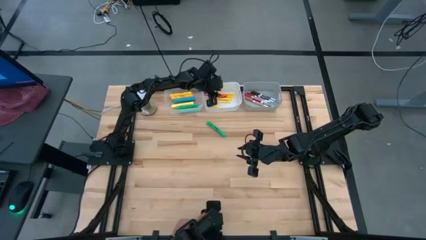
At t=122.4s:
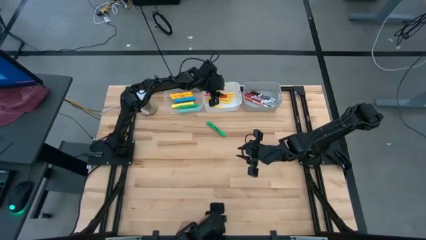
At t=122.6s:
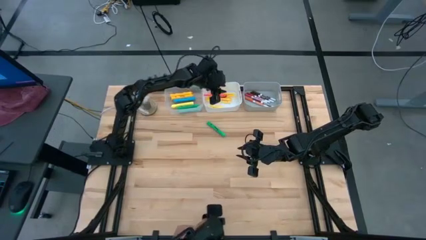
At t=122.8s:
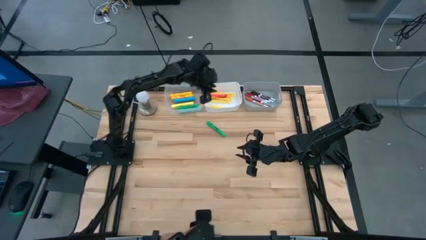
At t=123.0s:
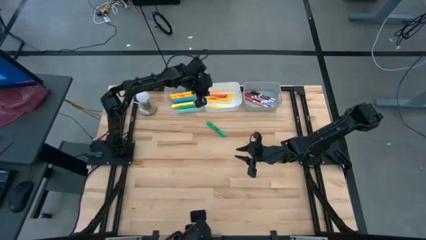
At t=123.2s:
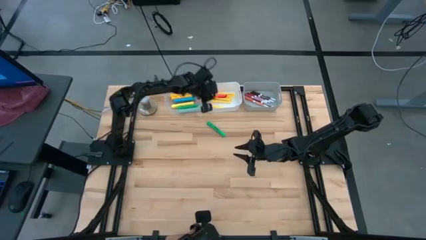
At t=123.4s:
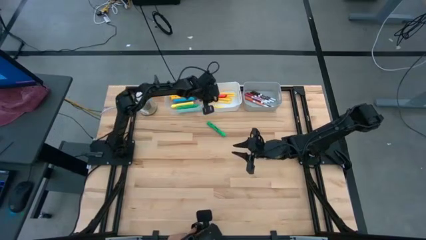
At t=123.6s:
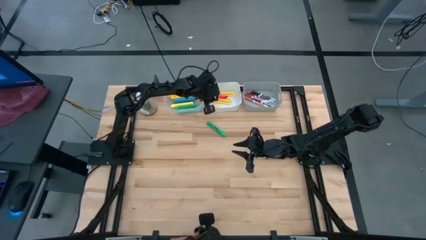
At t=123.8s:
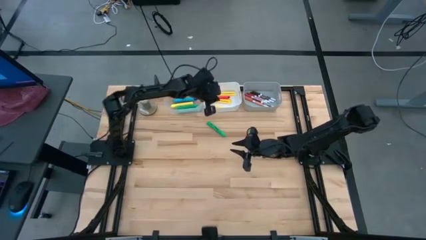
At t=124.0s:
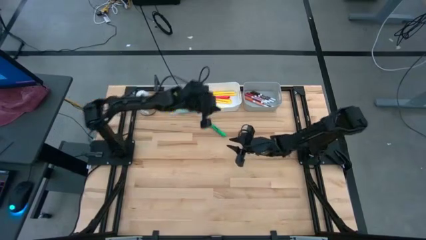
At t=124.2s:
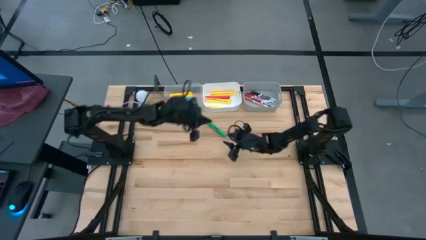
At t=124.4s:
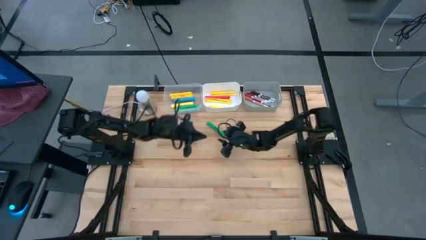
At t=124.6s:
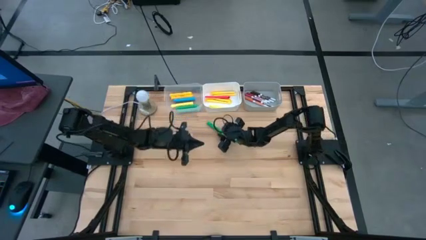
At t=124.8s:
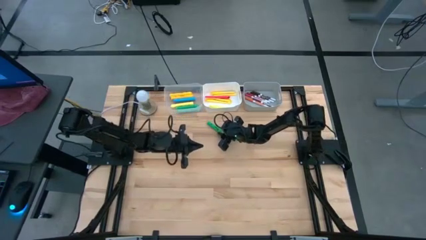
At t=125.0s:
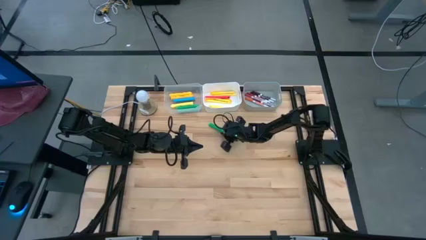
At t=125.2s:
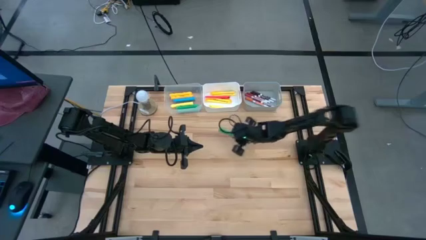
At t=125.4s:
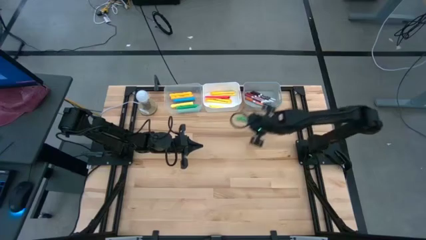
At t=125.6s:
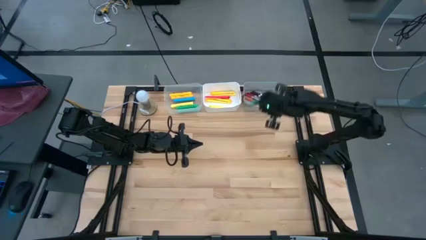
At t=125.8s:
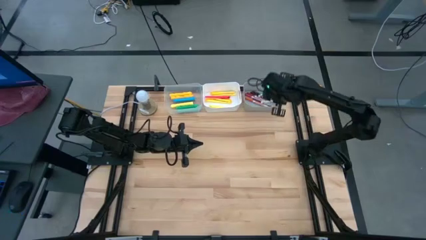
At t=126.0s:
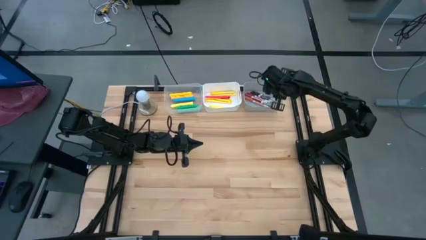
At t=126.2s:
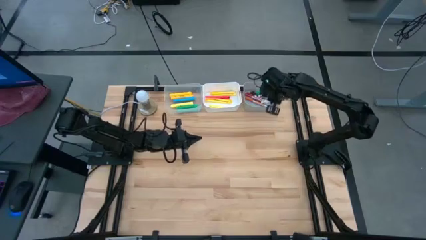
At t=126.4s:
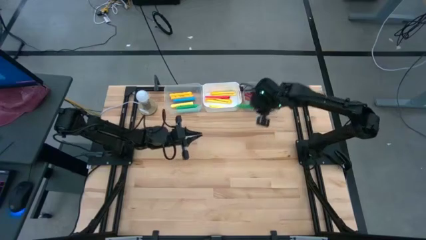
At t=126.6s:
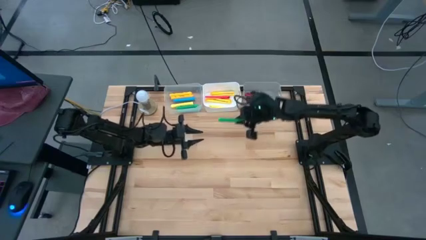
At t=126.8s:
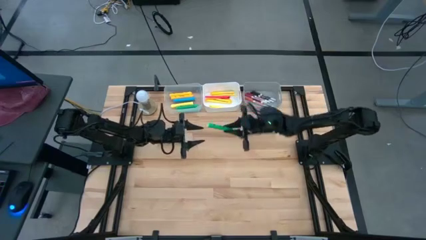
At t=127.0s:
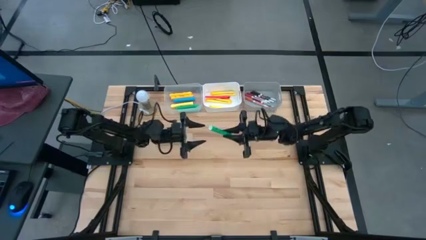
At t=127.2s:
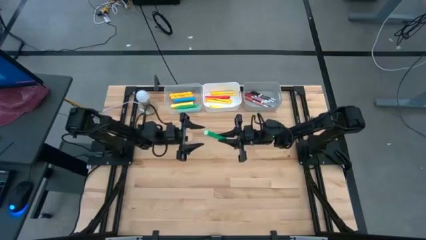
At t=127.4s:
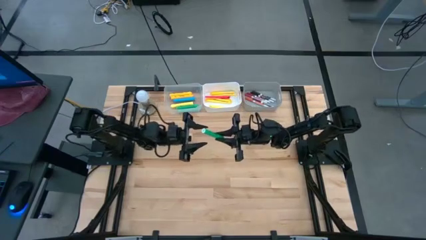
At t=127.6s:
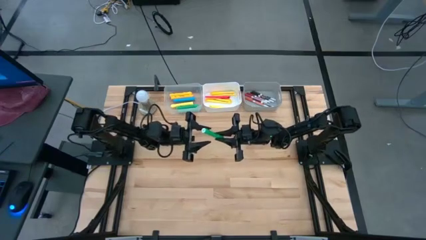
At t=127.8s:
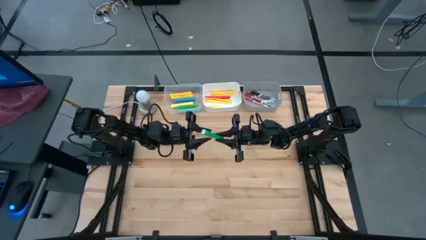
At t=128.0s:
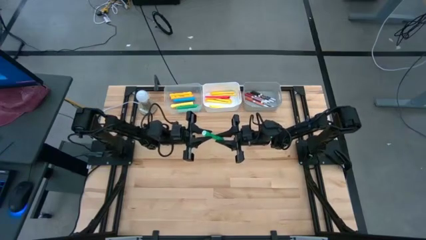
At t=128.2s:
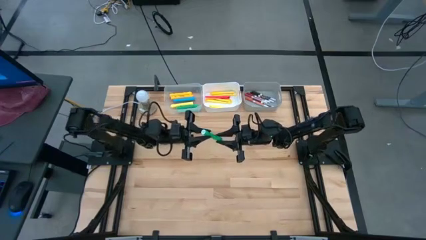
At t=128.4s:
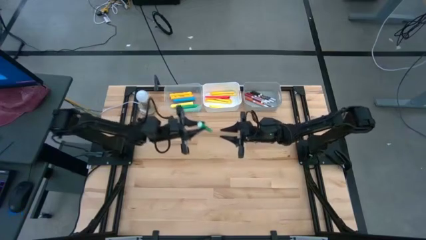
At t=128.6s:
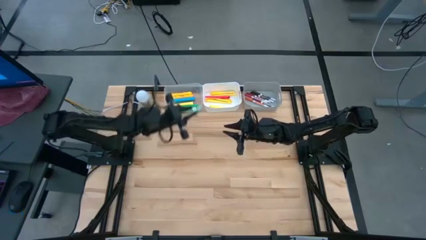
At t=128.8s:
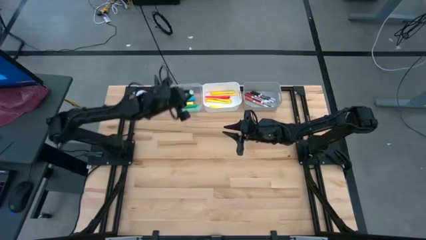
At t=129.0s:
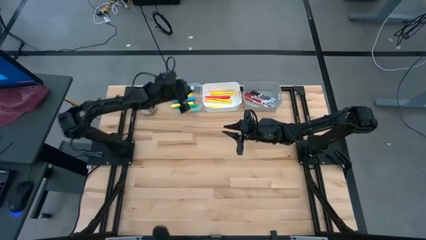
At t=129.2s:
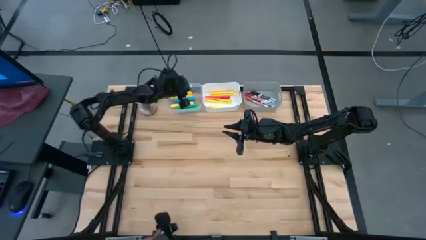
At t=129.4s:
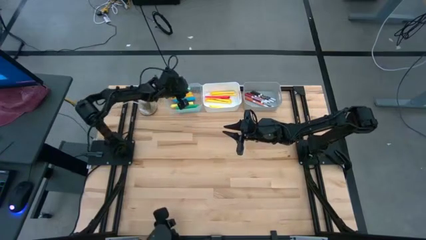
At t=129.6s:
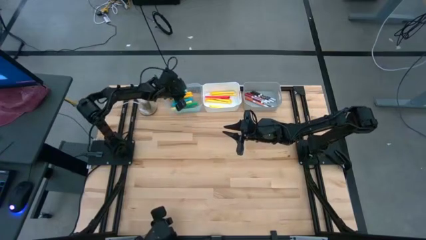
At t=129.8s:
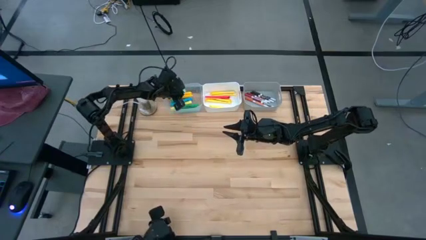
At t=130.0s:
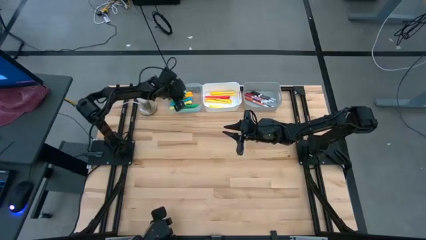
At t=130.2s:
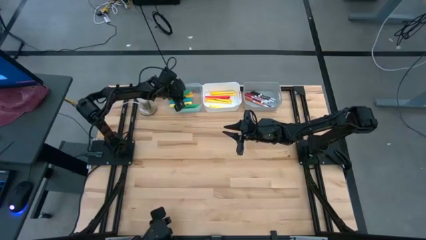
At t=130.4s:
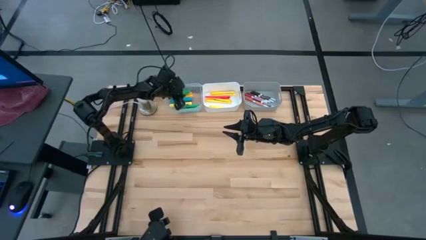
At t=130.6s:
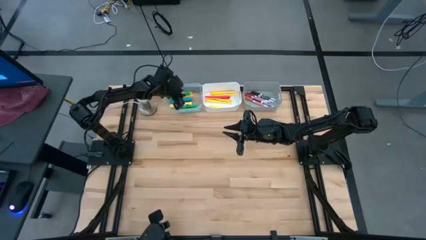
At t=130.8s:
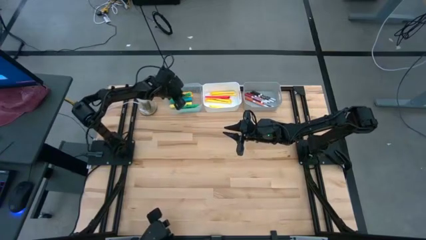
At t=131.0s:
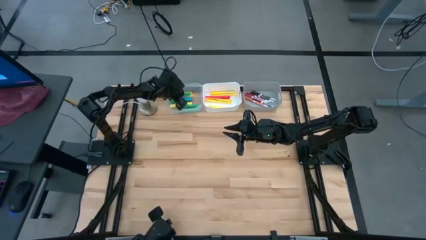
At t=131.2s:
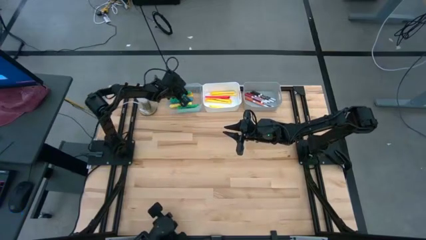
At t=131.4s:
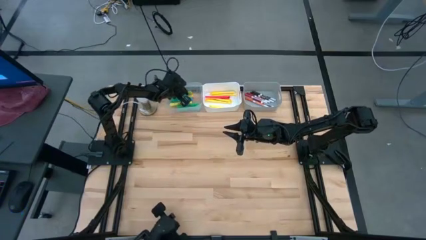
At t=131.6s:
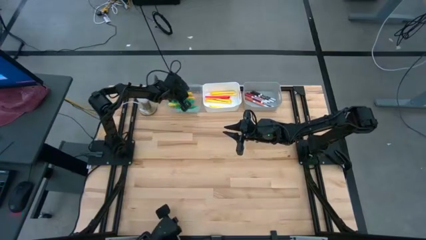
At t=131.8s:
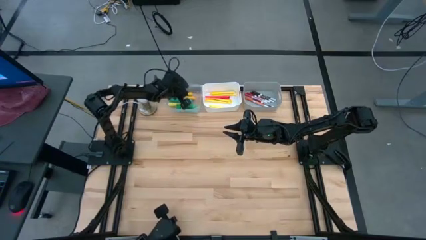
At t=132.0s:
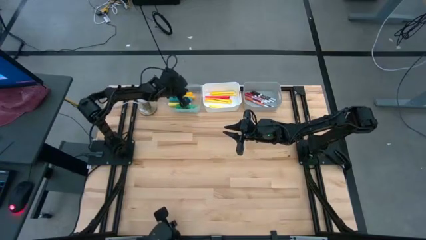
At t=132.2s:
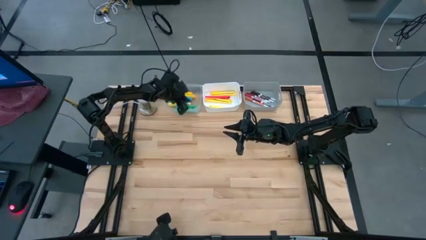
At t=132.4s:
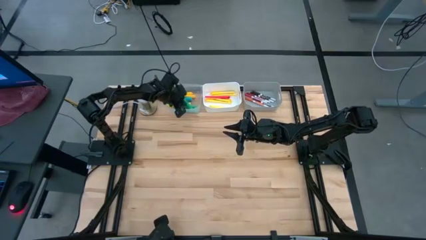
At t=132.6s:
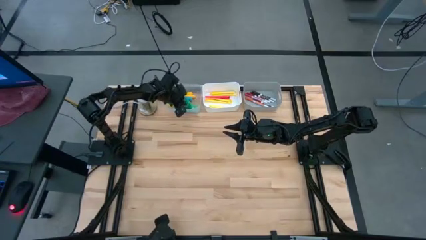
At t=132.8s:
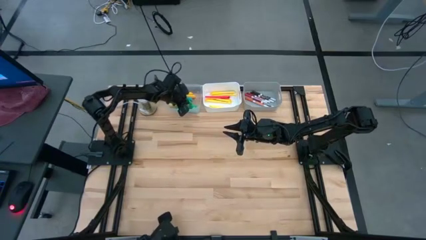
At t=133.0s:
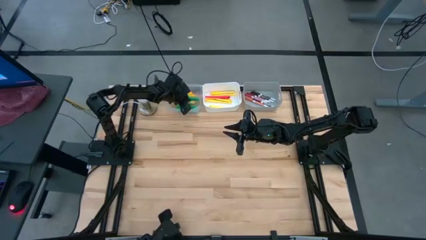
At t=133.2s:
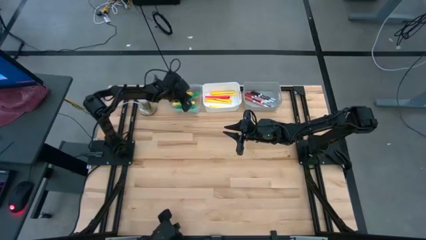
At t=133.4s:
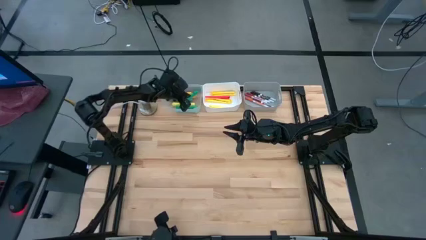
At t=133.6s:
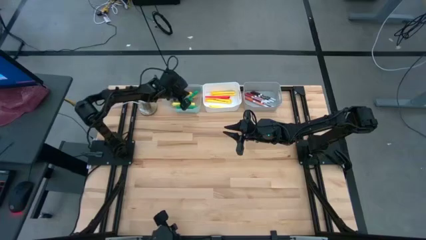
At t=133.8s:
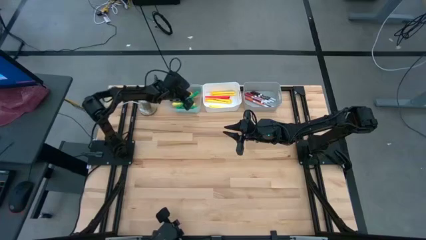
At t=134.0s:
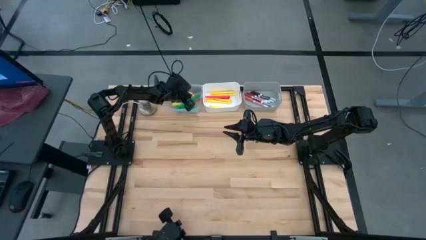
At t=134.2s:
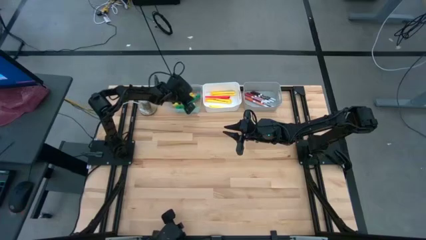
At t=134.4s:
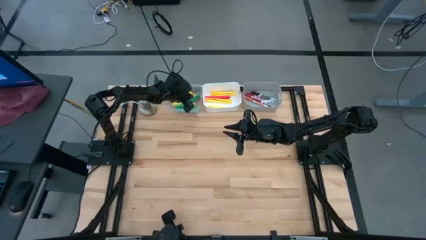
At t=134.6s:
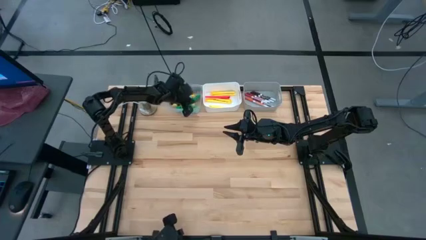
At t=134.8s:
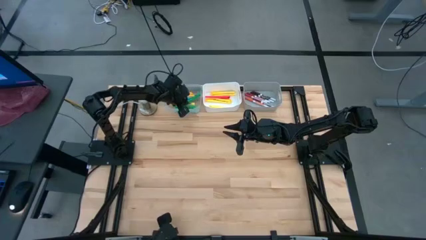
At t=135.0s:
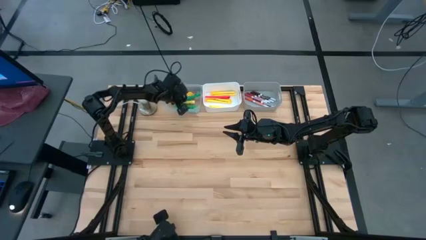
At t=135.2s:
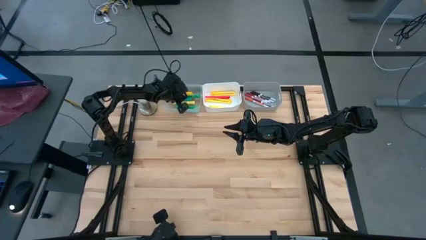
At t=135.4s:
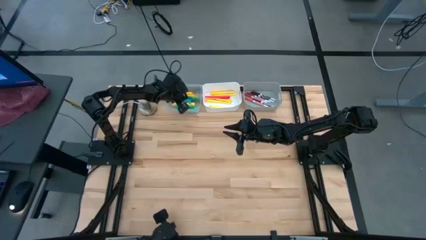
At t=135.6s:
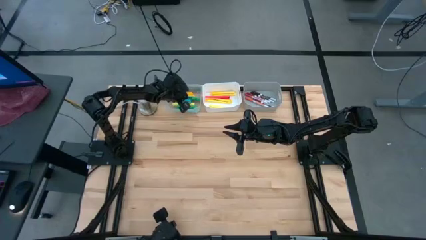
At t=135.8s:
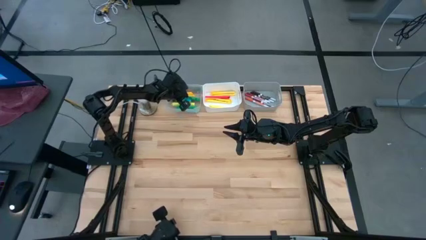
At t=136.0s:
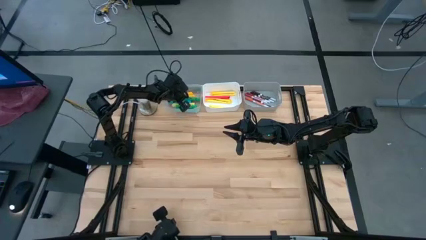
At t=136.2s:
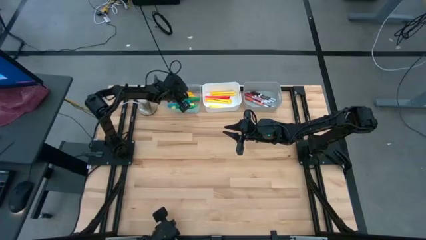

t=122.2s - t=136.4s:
Task: Pick & Place Markers
Put the green highlighter pen into the transparent bin
